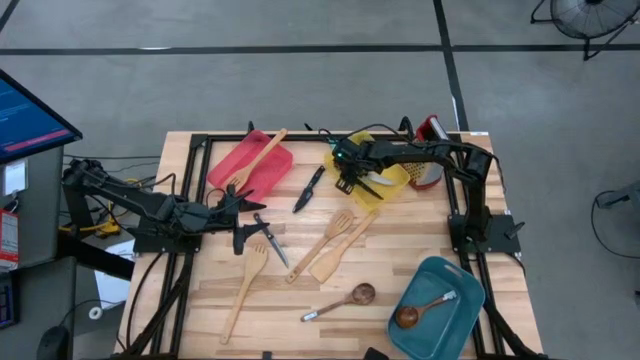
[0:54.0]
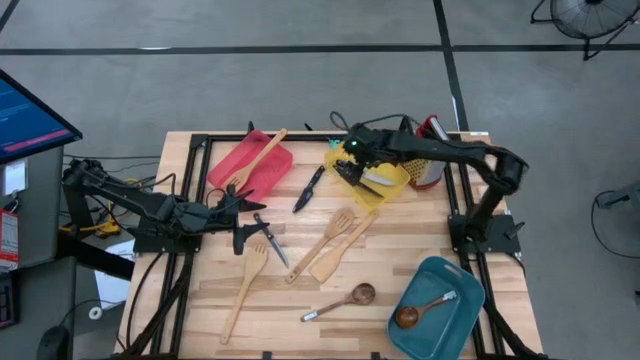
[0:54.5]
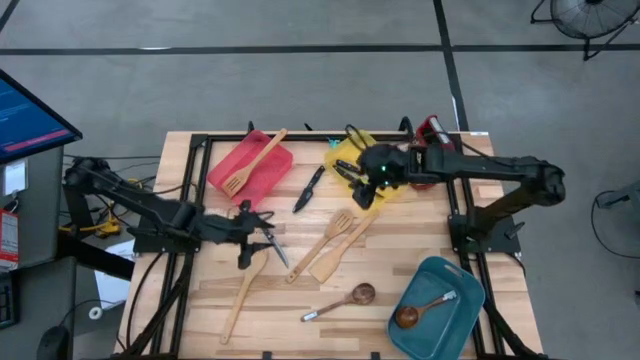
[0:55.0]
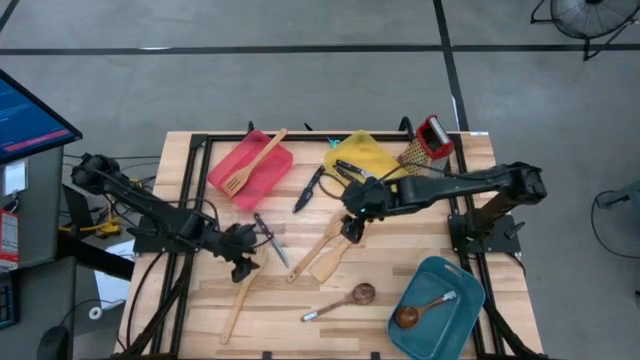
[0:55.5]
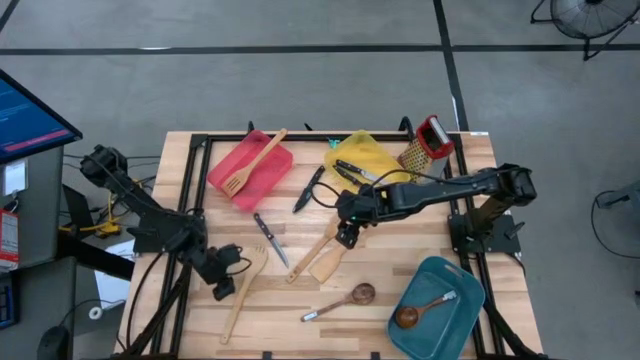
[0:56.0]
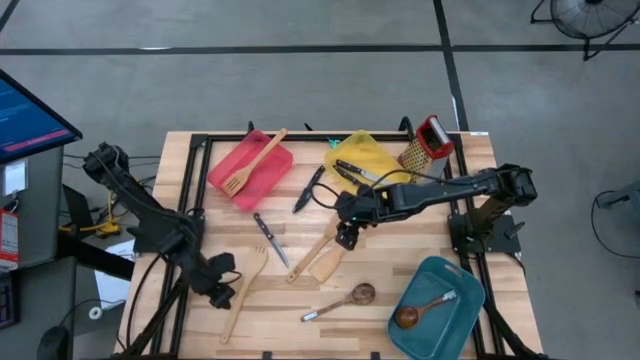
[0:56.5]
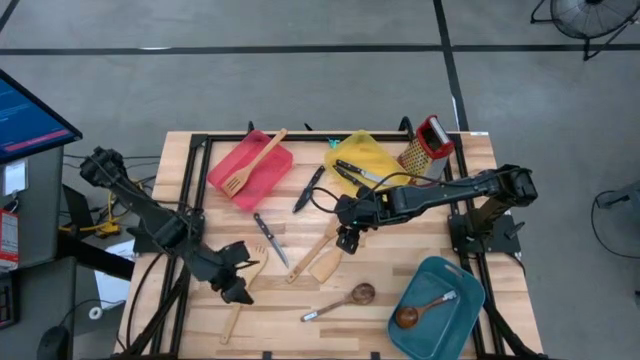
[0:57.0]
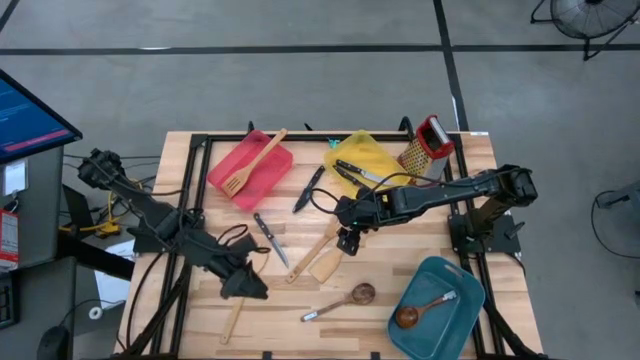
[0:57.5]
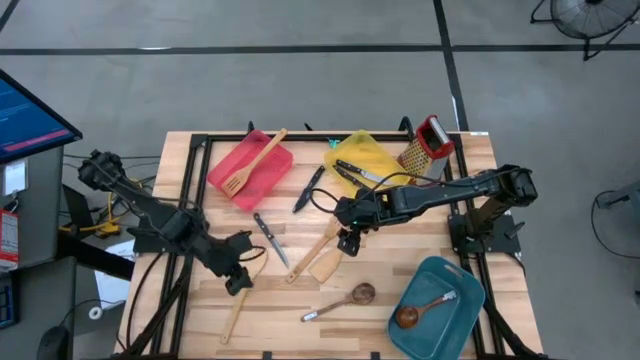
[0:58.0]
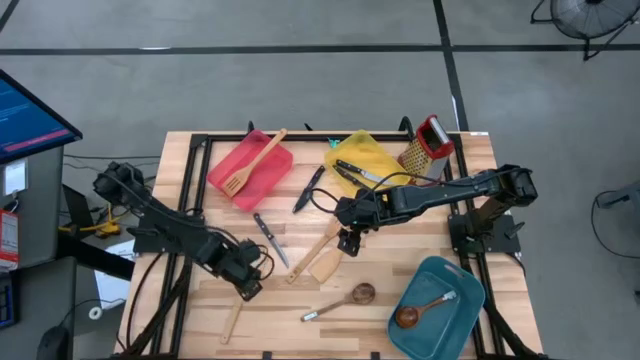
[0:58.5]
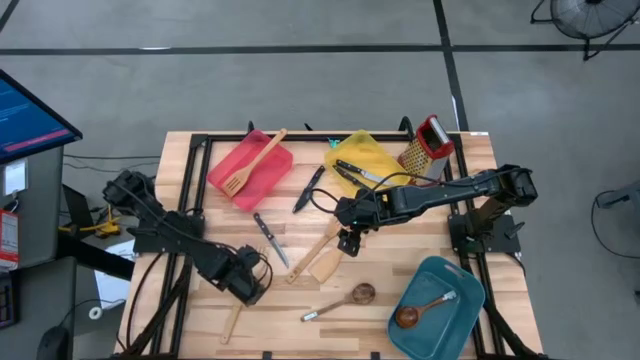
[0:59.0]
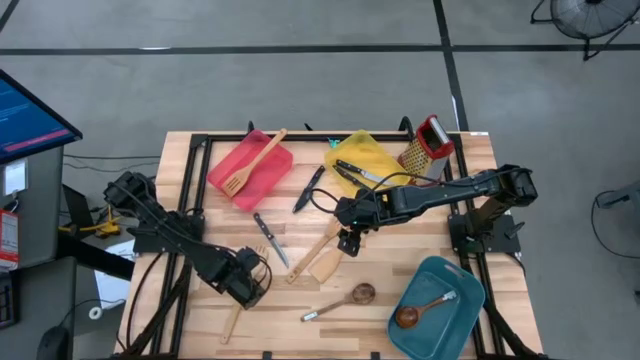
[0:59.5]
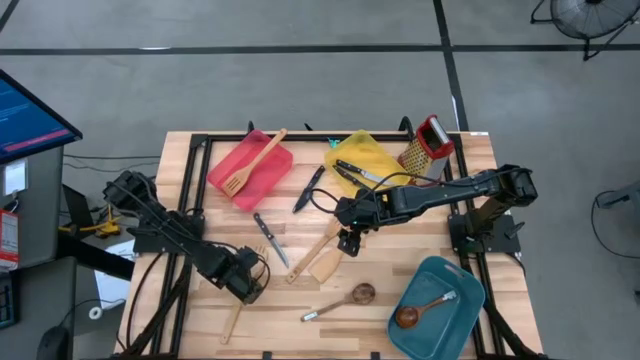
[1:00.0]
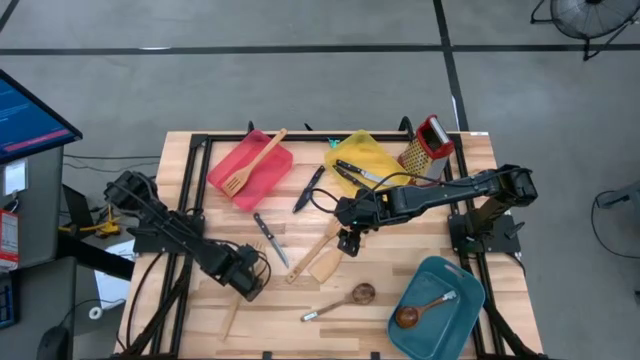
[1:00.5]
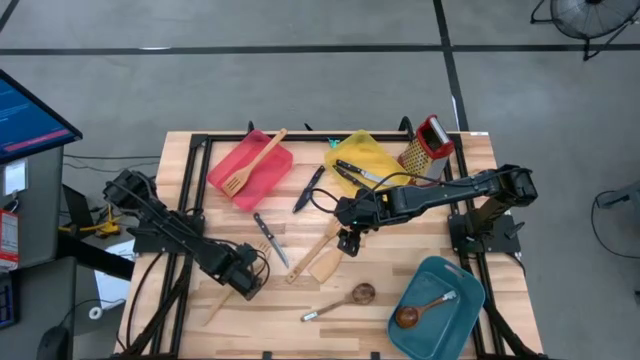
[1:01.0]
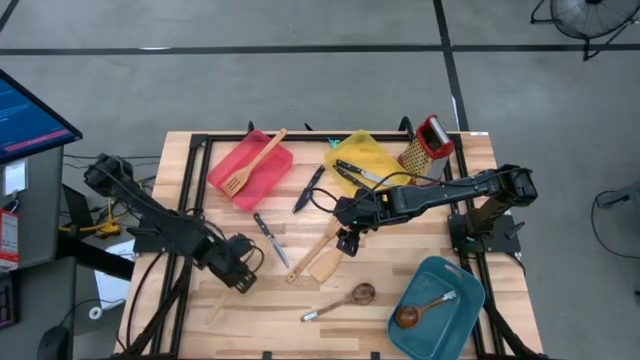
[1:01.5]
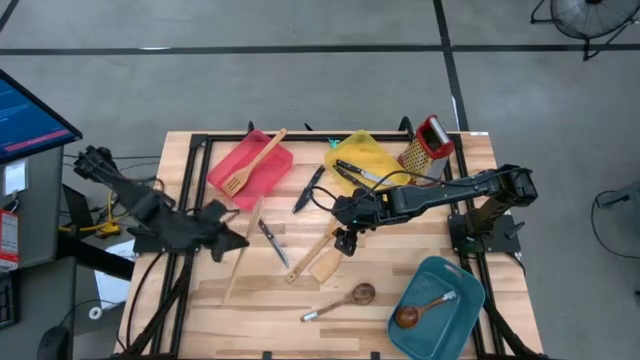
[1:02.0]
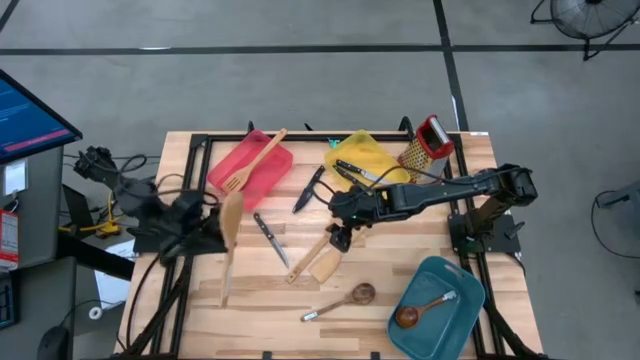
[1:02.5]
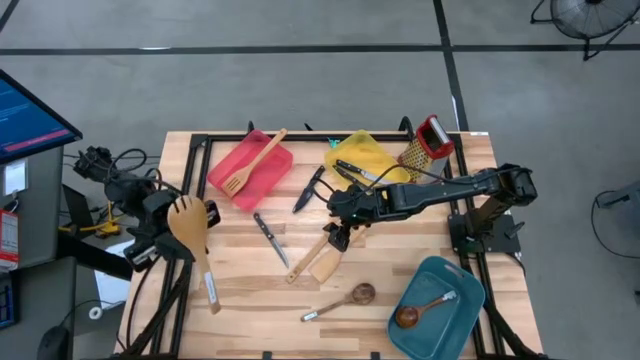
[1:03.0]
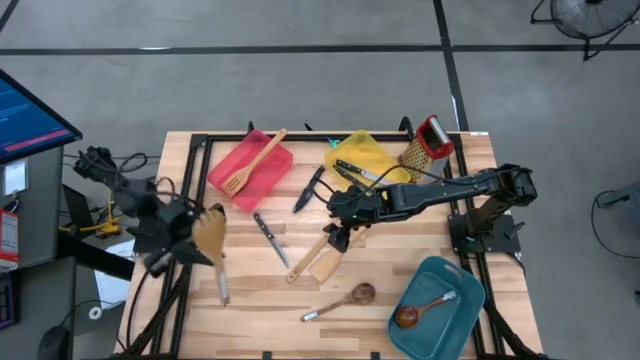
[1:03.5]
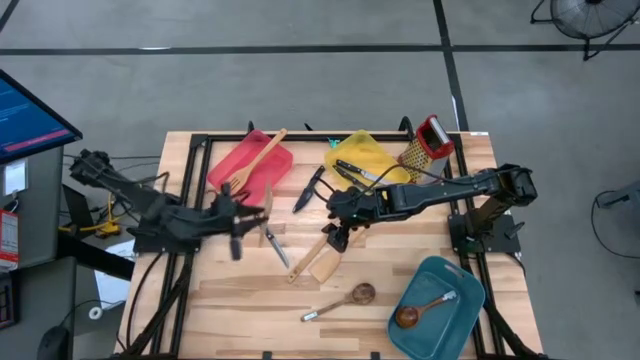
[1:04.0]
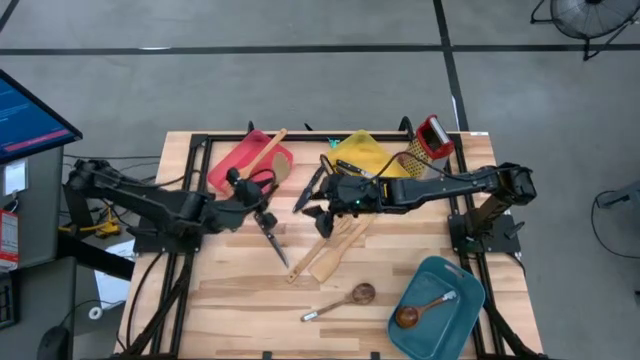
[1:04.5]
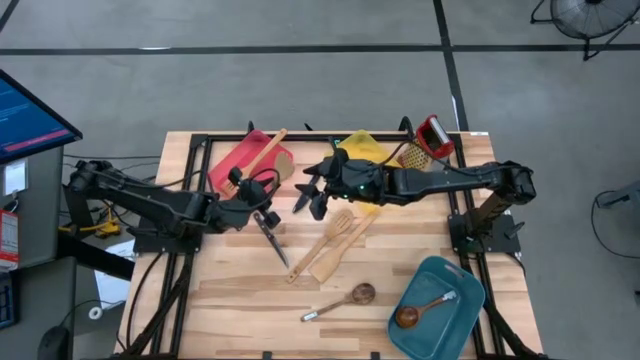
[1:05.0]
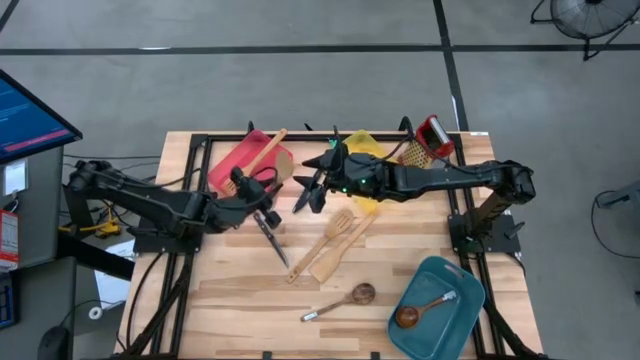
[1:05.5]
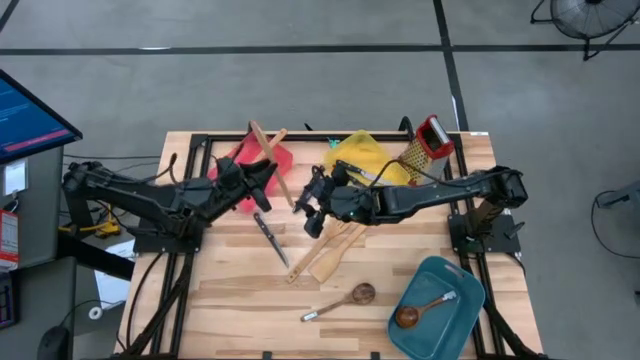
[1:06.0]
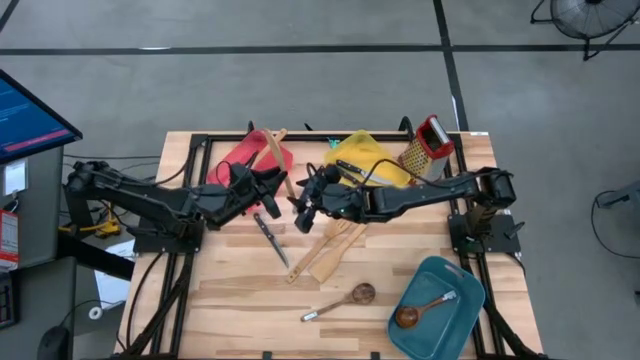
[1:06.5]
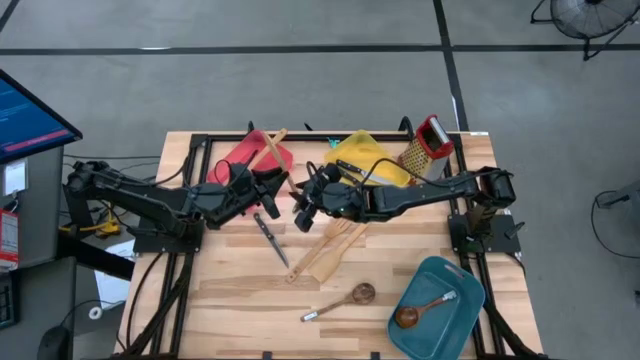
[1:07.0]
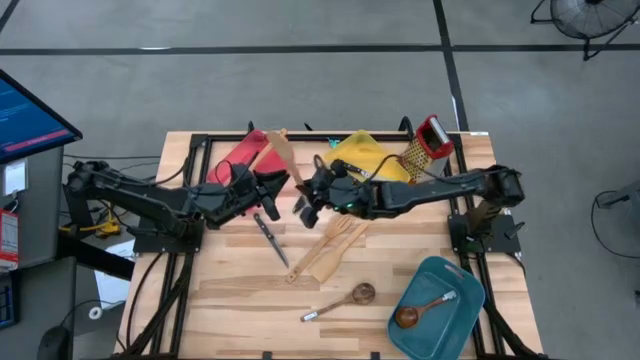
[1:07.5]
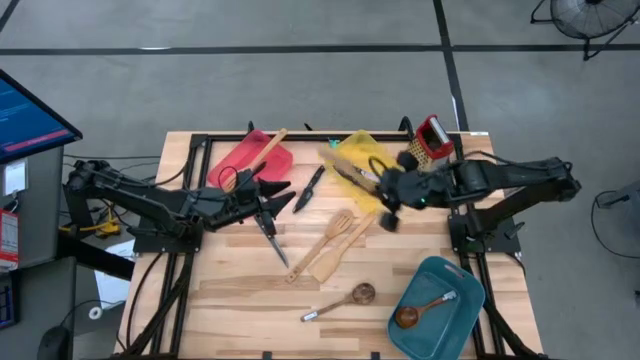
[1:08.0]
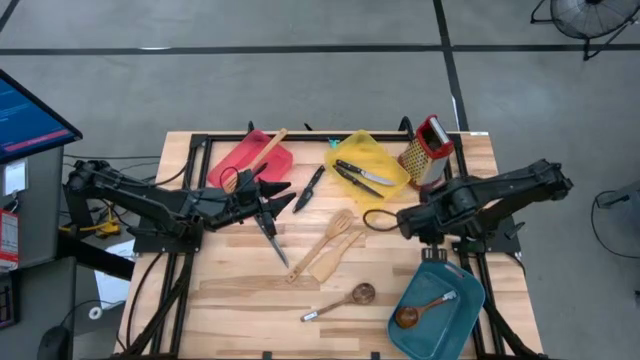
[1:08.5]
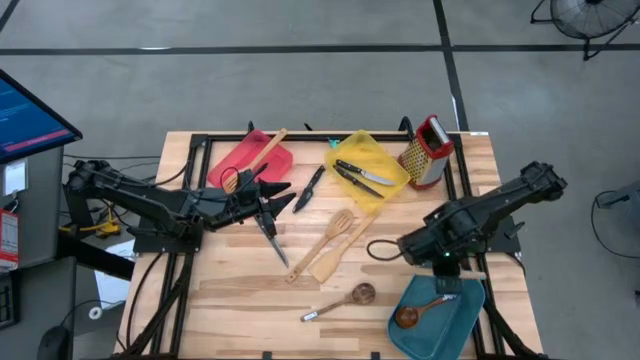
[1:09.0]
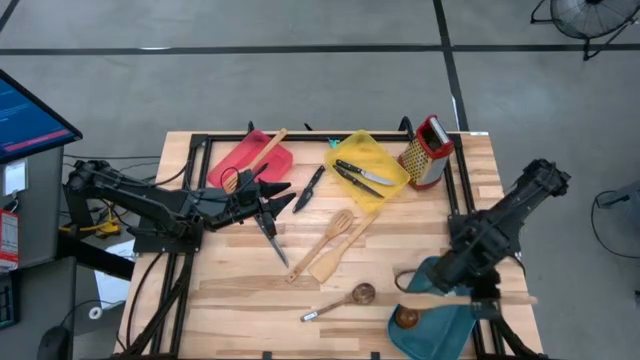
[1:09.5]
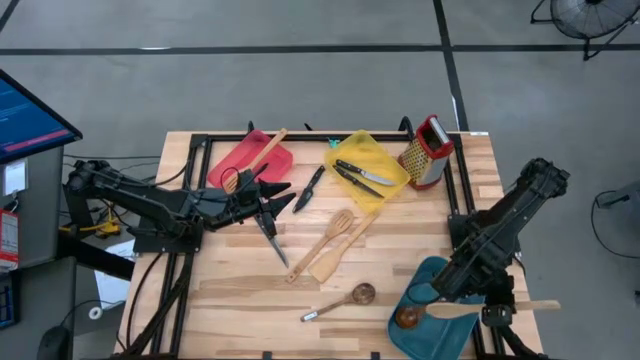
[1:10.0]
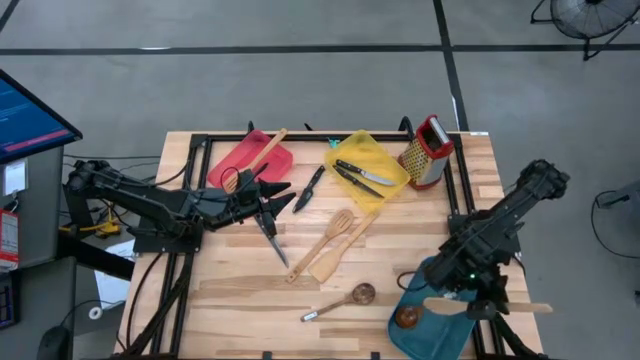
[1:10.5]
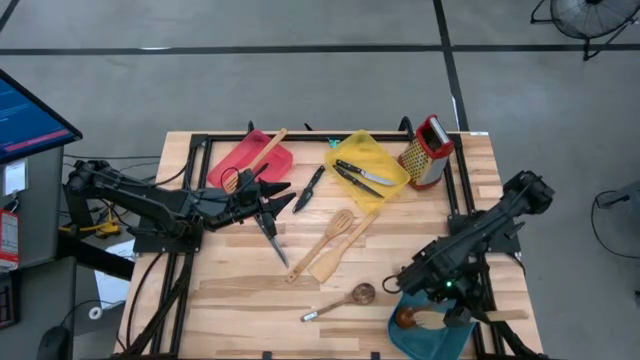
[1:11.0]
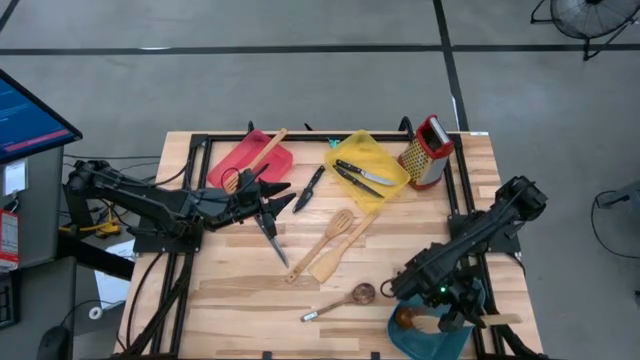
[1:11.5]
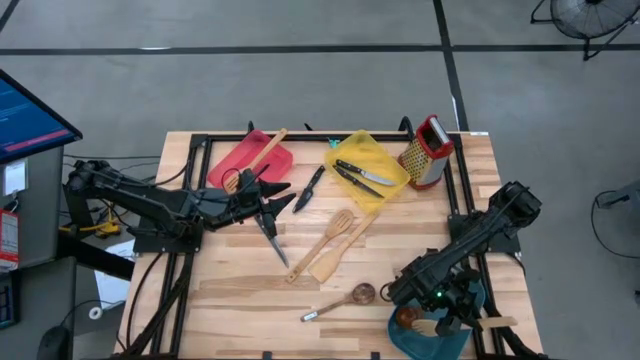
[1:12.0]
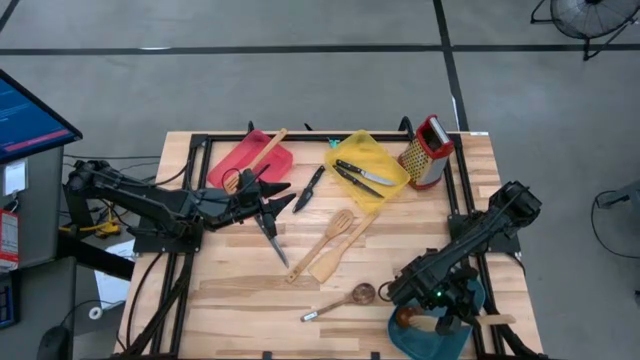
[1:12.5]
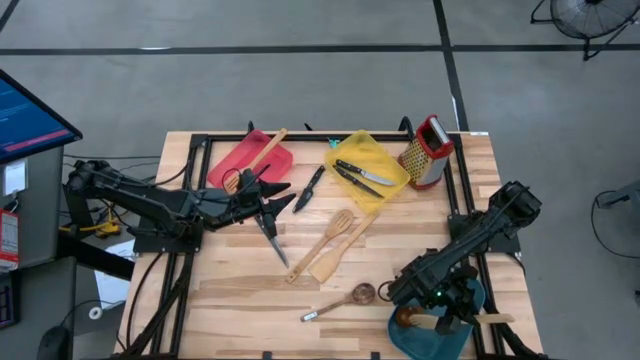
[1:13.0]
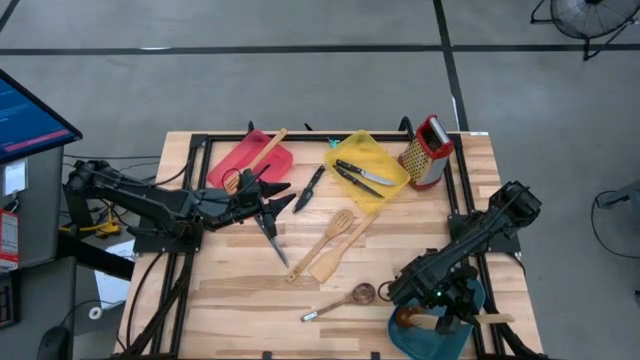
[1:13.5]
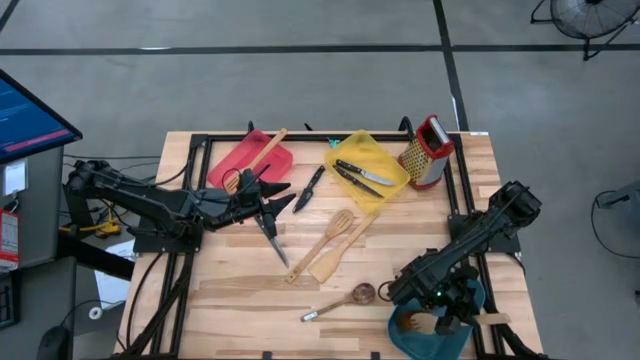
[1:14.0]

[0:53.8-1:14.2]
Task: Pick & Place Kitchen Items
Put the wooden serving fork into the blue bin
